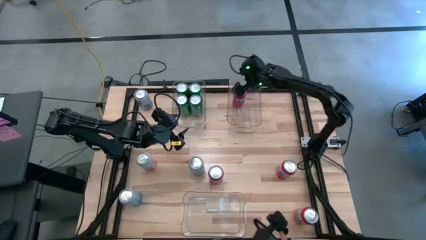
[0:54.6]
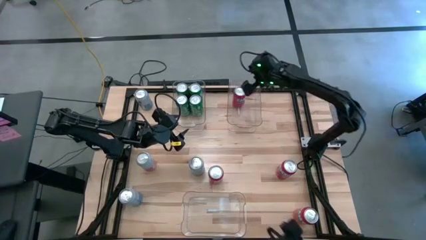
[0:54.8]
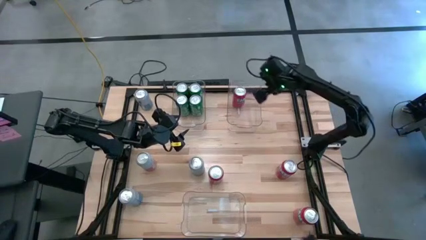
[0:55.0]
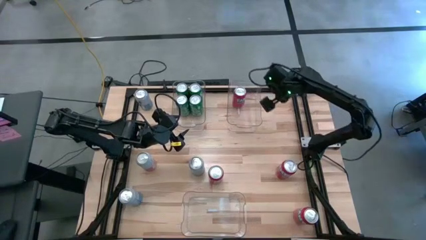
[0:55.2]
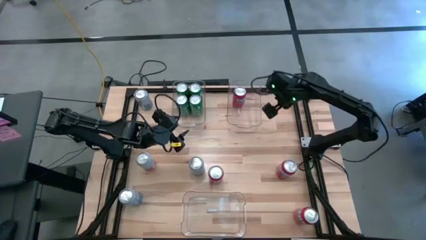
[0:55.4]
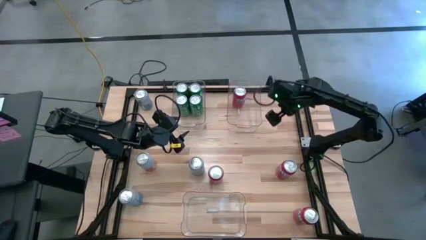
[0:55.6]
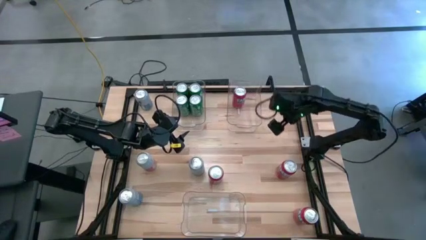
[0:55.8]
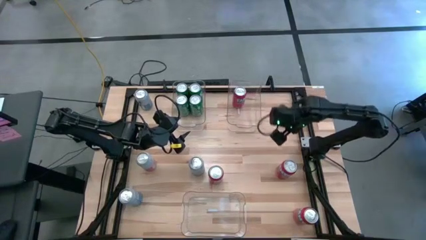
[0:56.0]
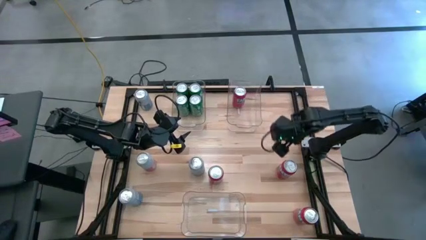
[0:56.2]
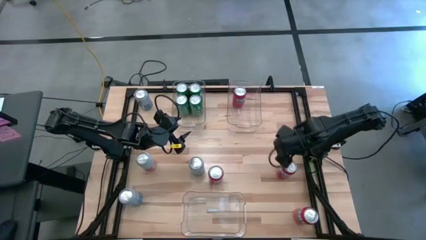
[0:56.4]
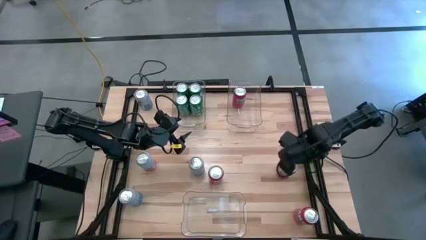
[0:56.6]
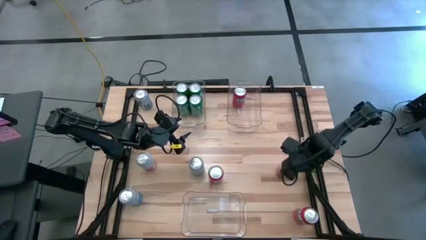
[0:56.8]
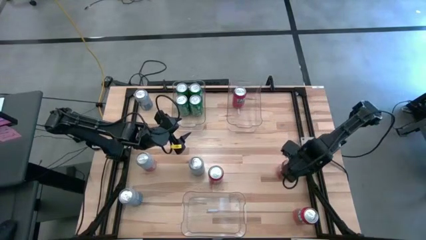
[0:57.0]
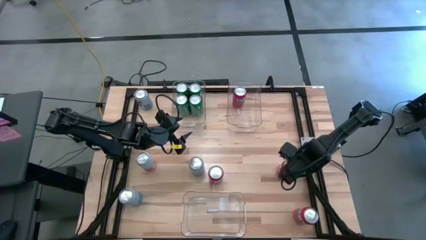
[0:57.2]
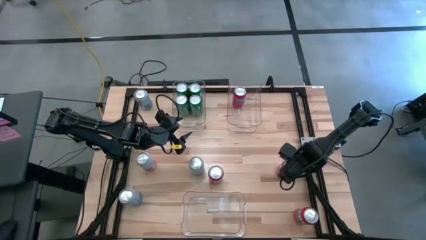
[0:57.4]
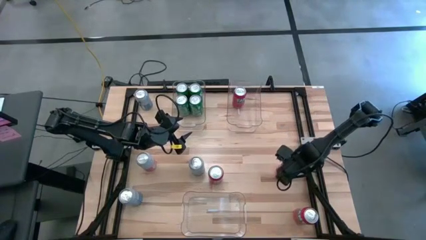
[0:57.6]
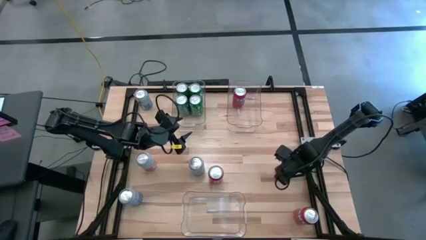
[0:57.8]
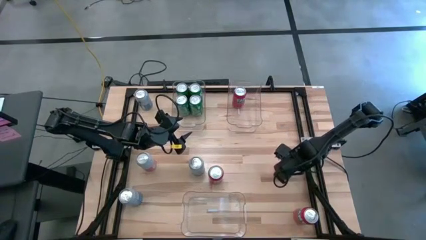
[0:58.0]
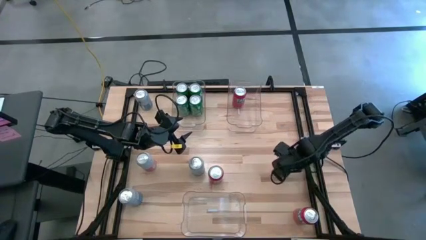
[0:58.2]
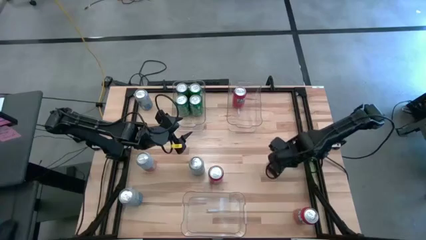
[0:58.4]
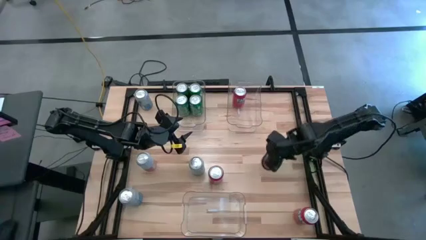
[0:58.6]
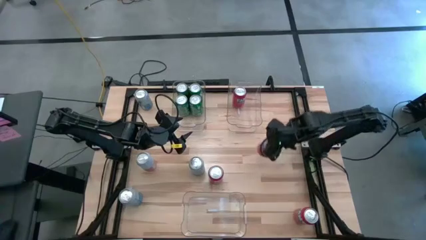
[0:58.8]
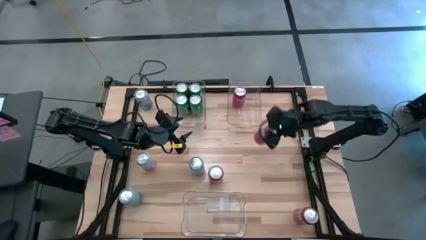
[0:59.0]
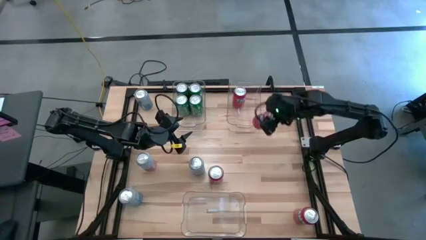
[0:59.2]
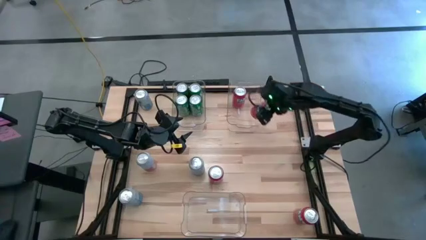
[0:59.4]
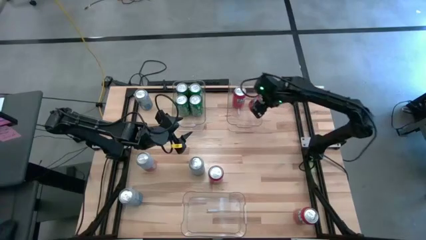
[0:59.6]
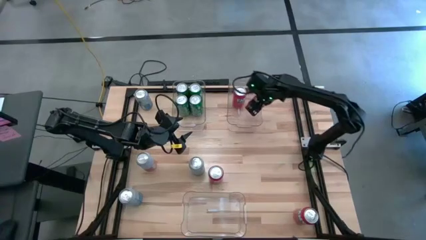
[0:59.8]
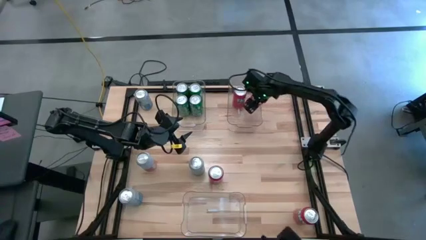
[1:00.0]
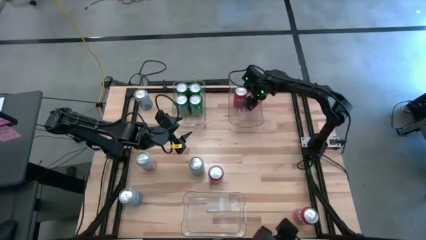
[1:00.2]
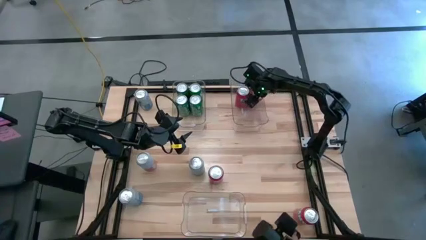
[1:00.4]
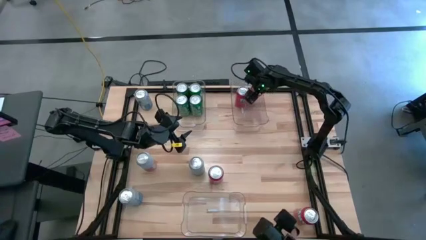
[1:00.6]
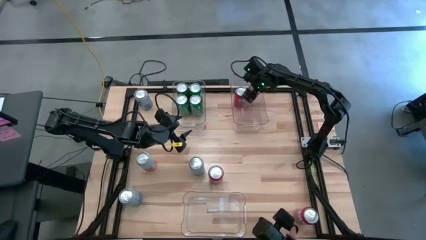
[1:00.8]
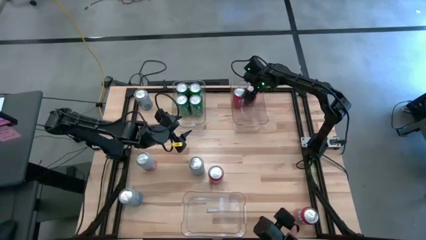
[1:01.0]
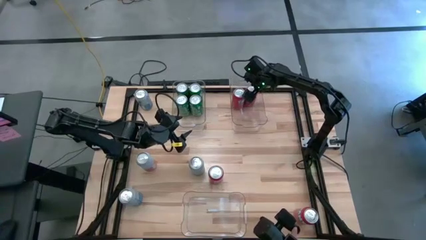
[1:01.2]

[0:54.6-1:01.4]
Task: Sort soda cans
Put the red soda can into the top right transparent bin

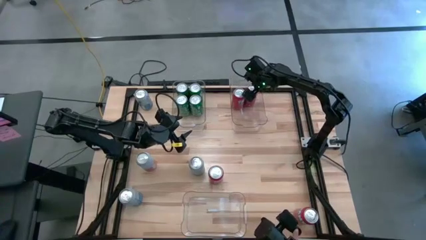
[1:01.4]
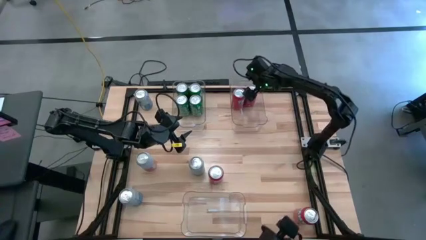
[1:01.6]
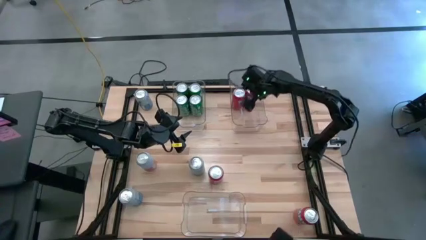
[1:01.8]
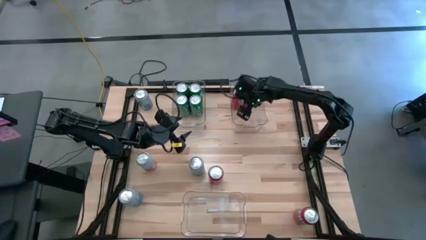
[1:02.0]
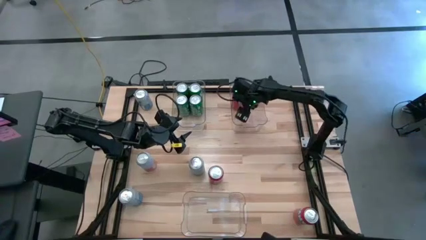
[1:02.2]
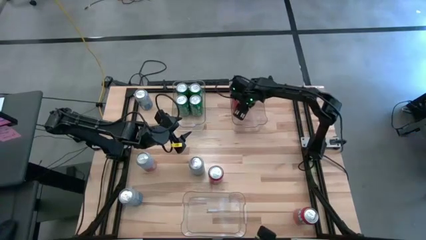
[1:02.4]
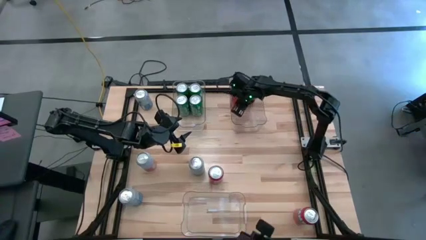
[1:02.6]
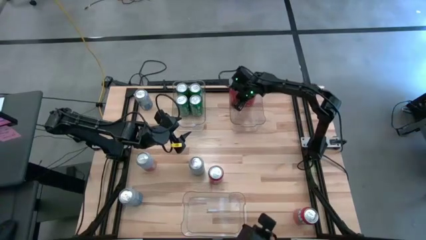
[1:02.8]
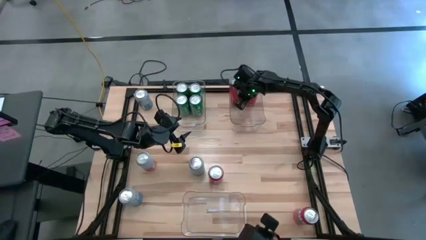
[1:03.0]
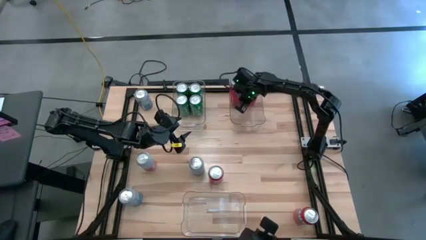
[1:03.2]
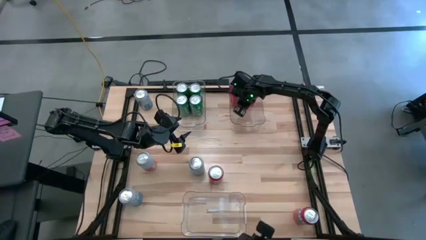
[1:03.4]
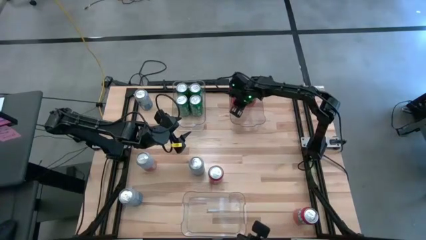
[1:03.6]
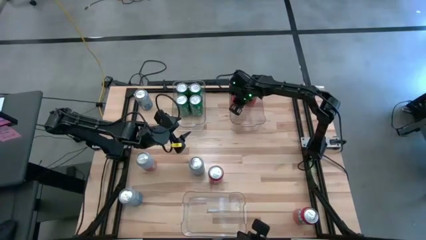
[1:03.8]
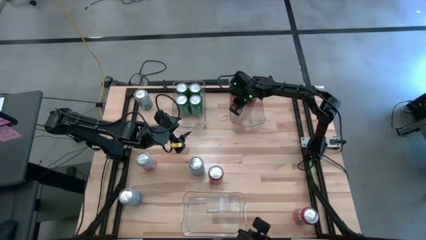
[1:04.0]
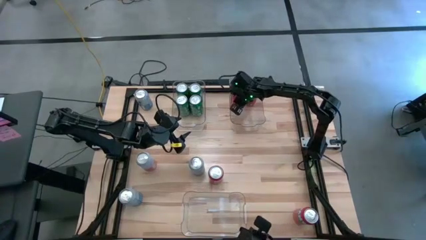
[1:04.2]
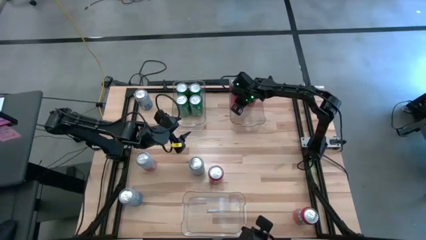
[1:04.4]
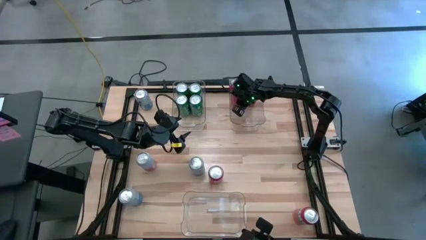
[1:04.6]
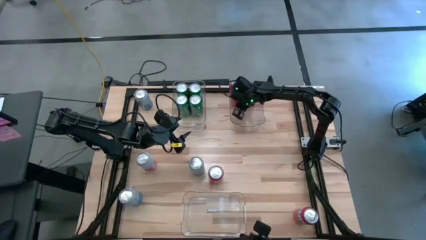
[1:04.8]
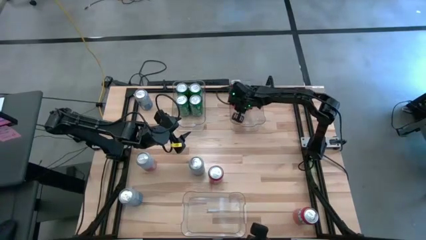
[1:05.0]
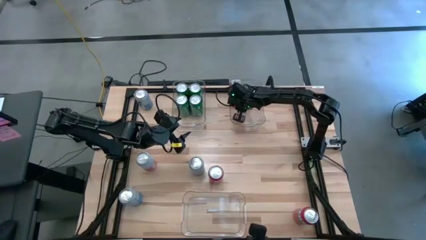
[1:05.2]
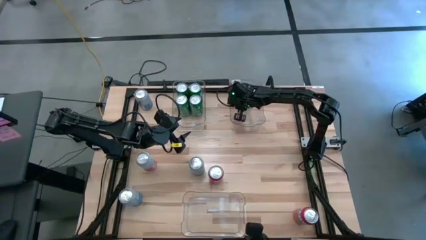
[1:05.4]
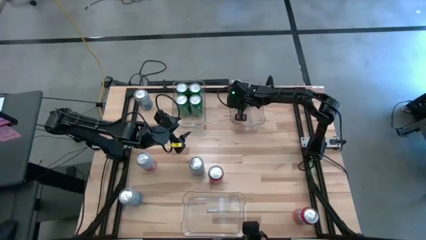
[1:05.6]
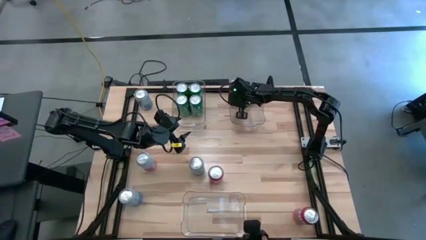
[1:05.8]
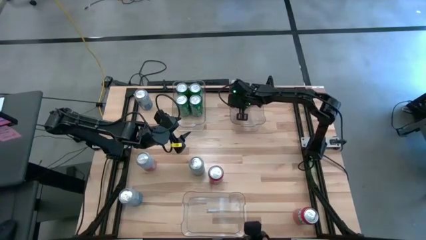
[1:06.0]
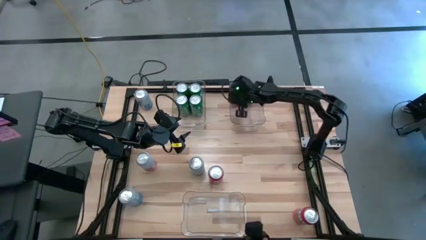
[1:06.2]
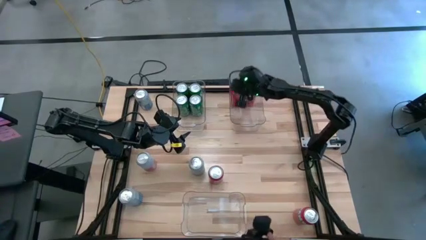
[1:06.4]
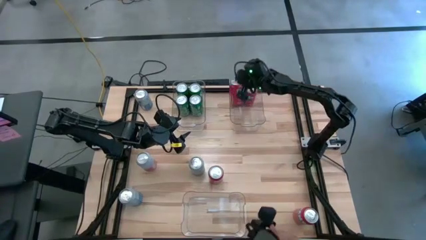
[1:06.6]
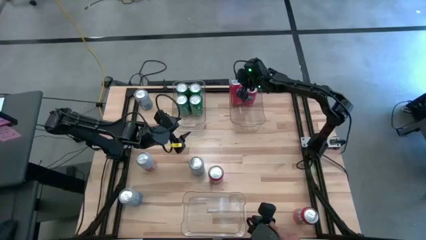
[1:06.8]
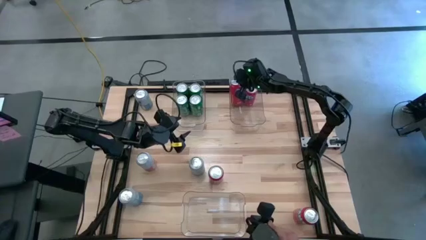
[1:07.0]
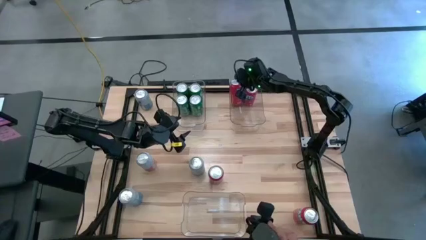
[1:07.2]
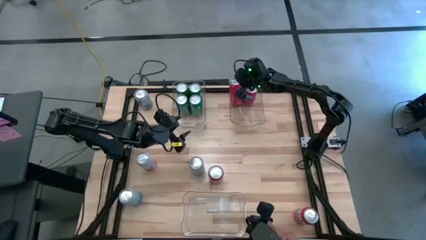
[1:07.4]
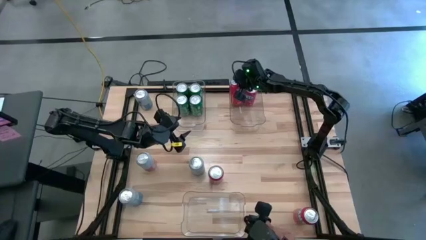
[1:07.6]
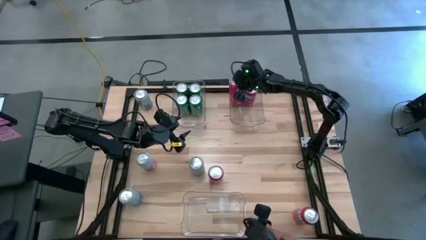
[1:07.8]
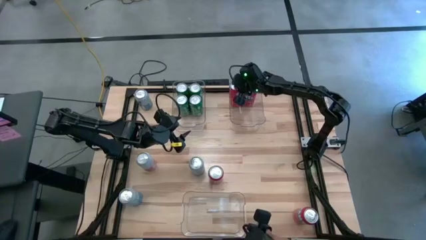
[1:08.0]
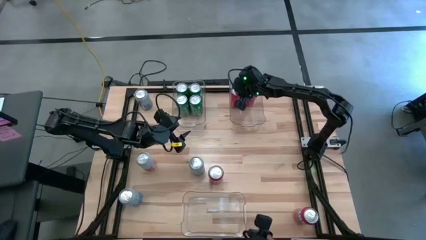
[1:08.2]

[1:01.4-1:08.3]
Adjust the red soda can in the top right transparent bin
